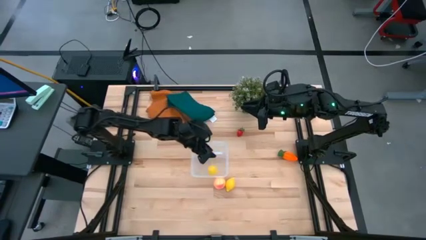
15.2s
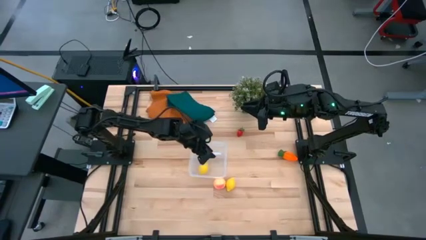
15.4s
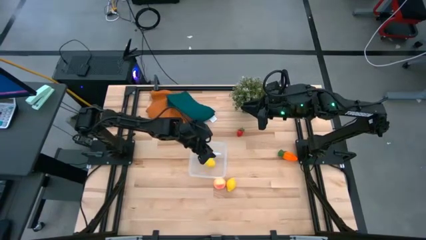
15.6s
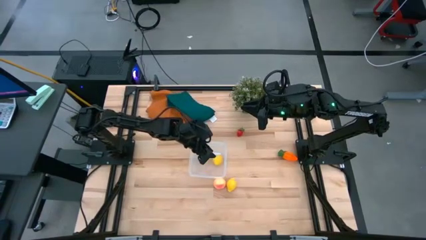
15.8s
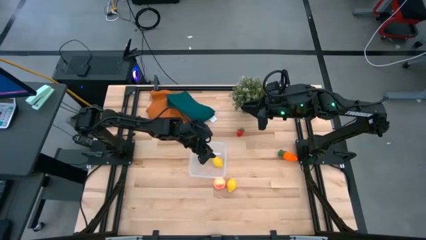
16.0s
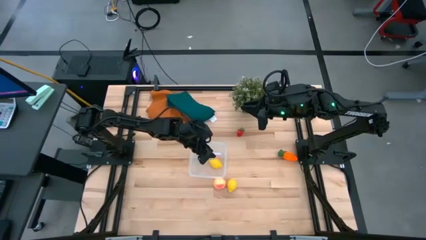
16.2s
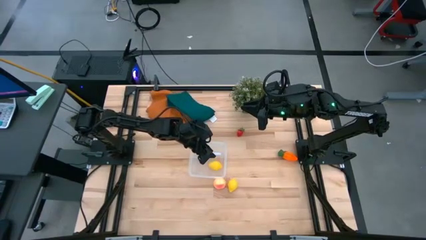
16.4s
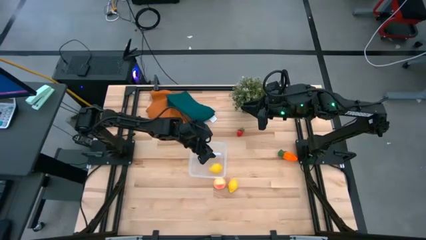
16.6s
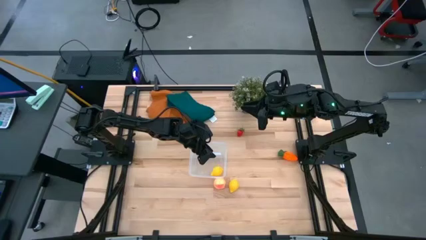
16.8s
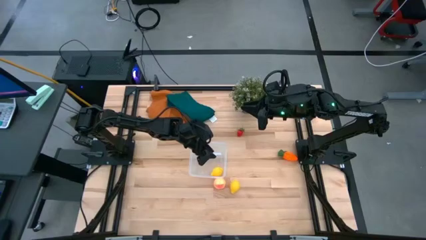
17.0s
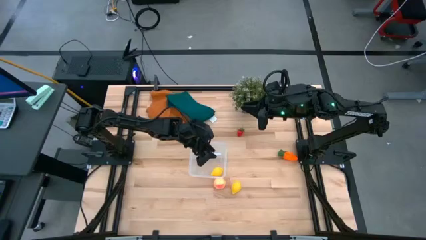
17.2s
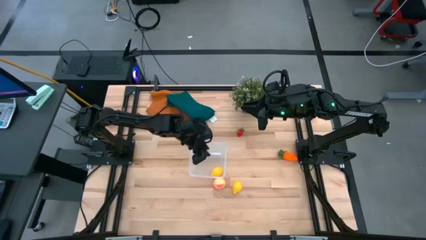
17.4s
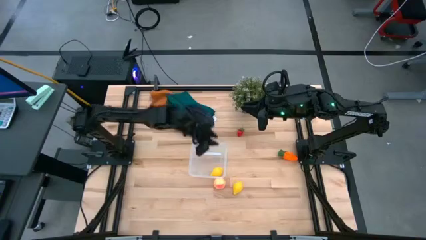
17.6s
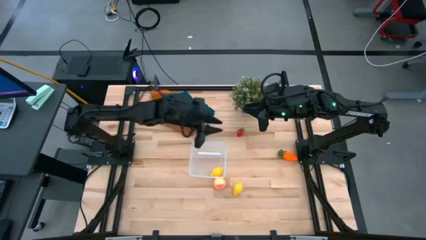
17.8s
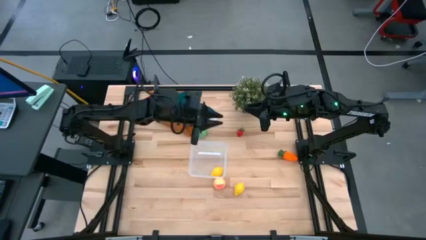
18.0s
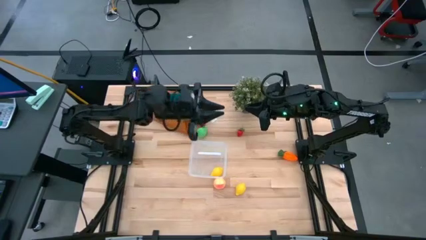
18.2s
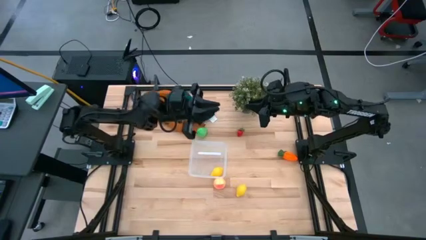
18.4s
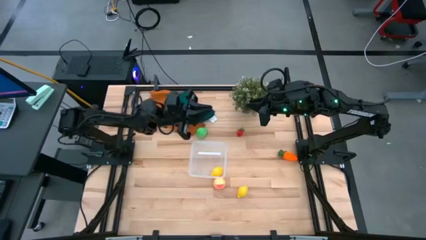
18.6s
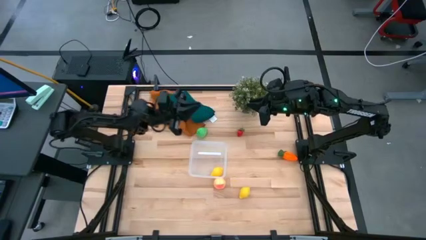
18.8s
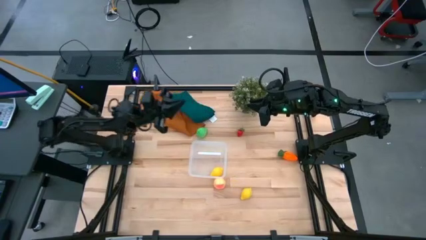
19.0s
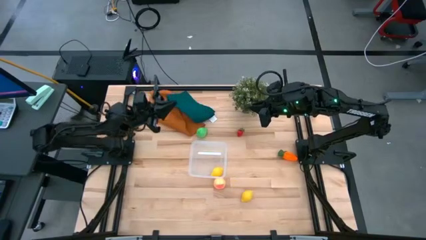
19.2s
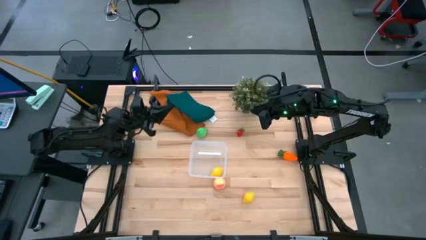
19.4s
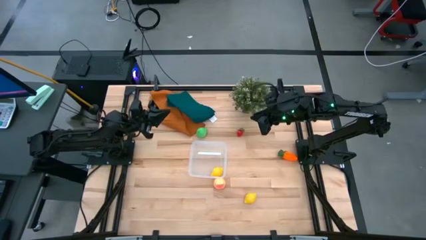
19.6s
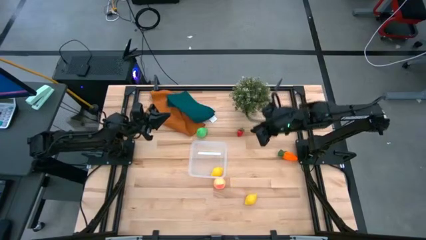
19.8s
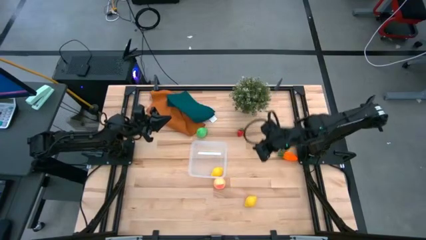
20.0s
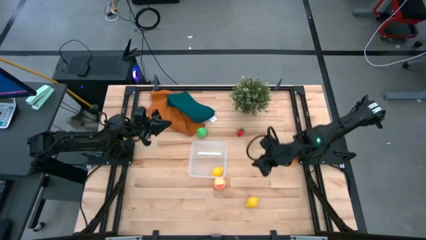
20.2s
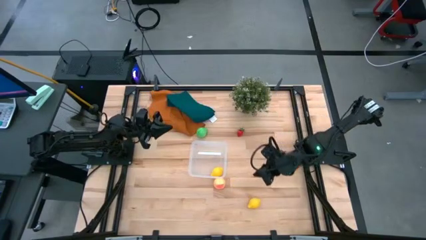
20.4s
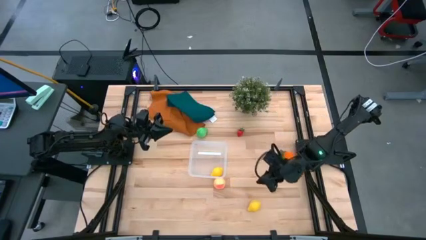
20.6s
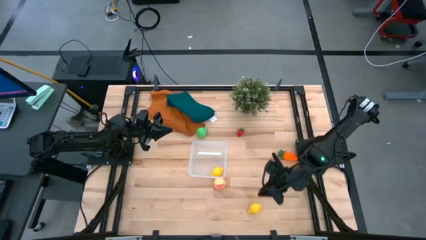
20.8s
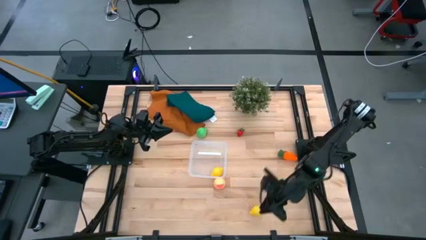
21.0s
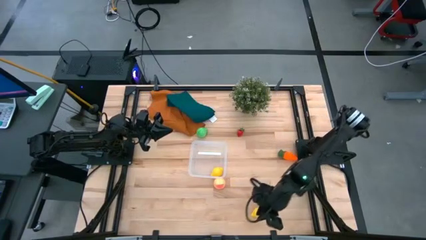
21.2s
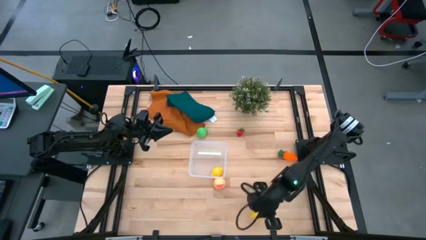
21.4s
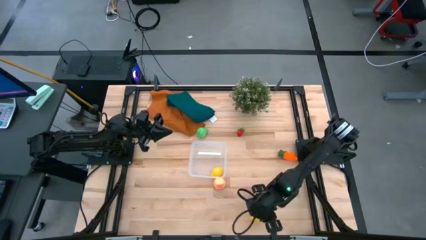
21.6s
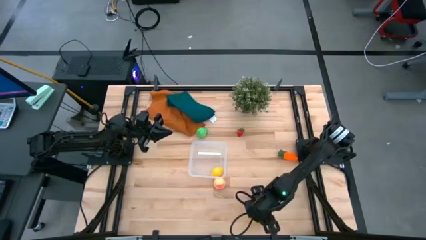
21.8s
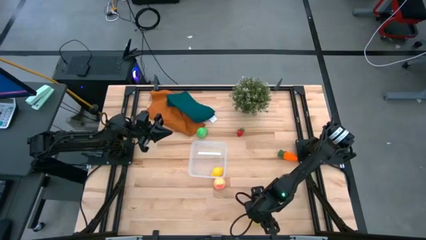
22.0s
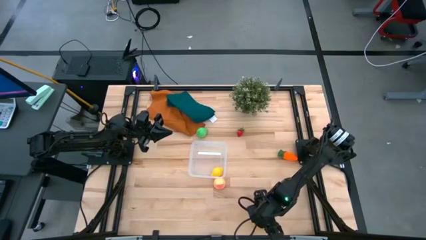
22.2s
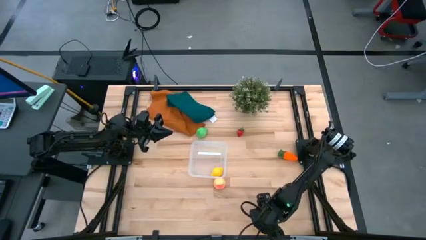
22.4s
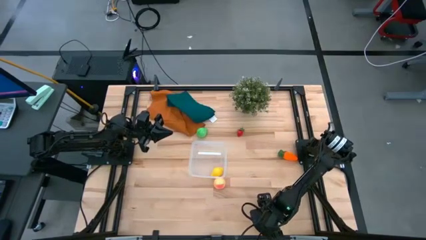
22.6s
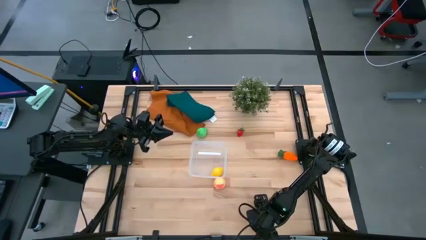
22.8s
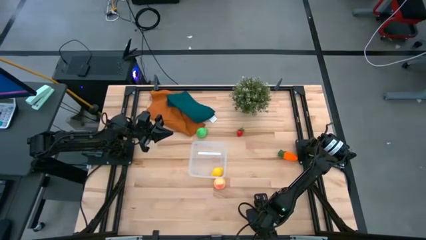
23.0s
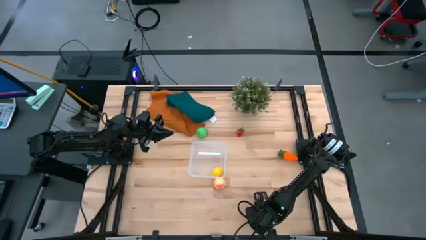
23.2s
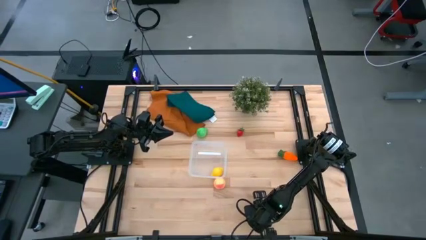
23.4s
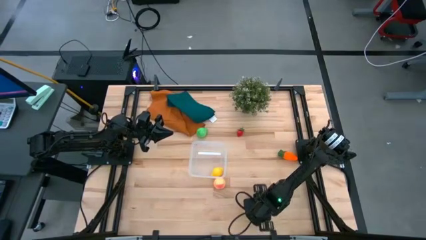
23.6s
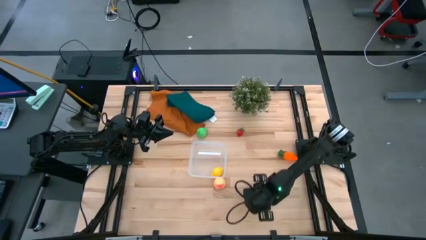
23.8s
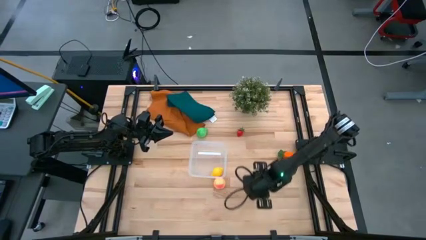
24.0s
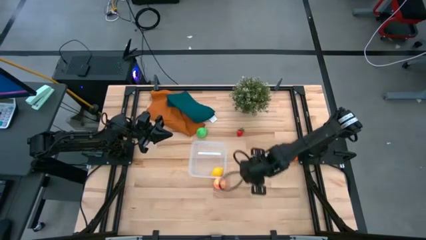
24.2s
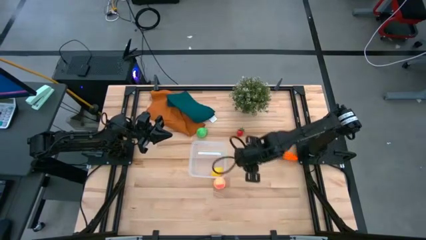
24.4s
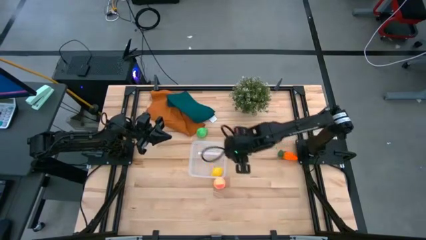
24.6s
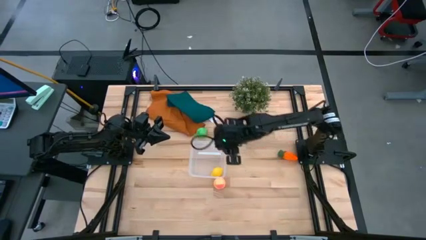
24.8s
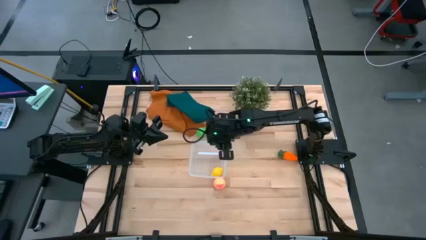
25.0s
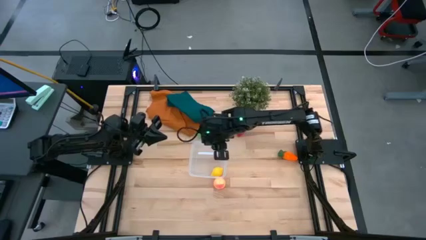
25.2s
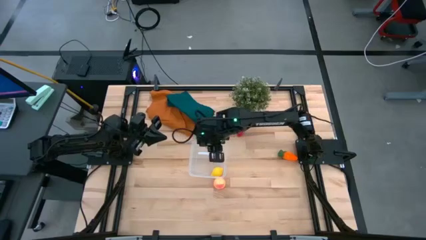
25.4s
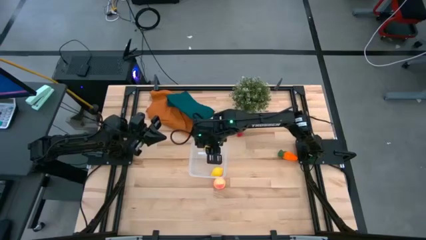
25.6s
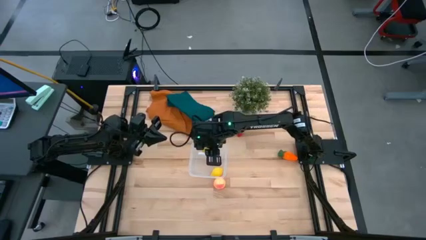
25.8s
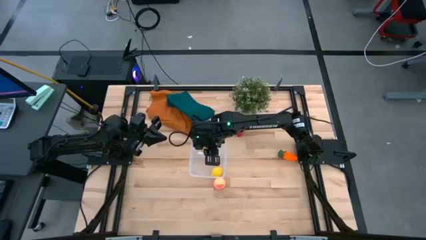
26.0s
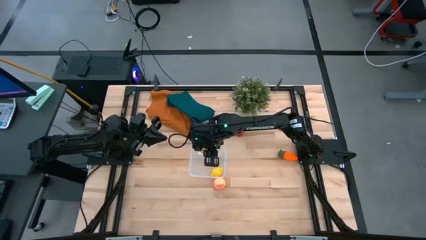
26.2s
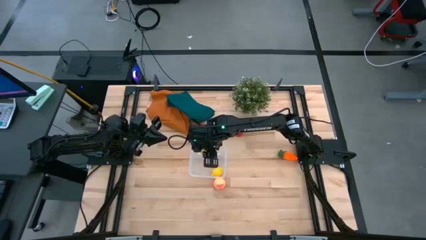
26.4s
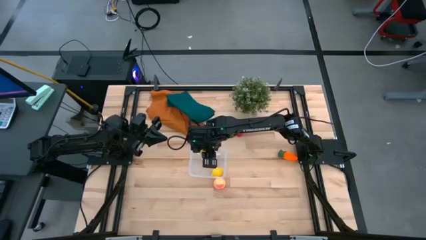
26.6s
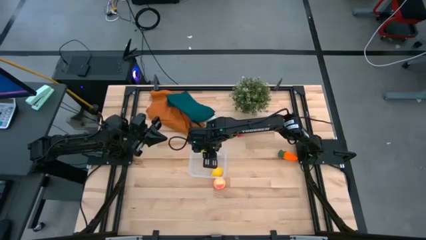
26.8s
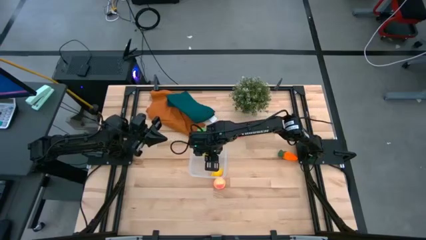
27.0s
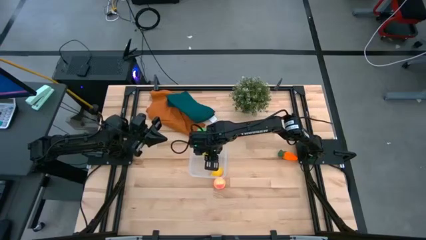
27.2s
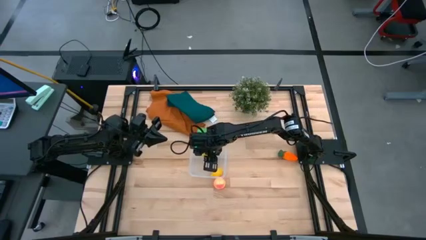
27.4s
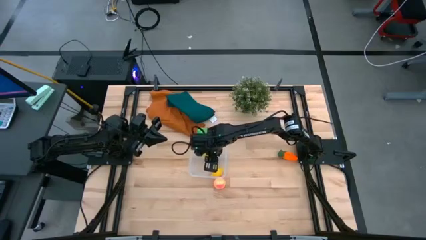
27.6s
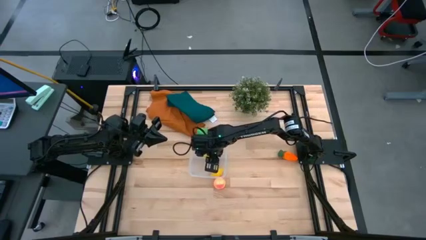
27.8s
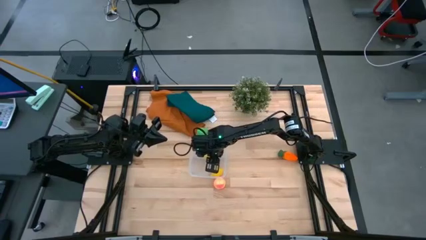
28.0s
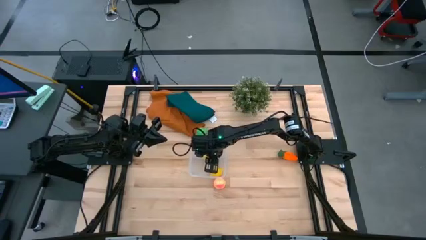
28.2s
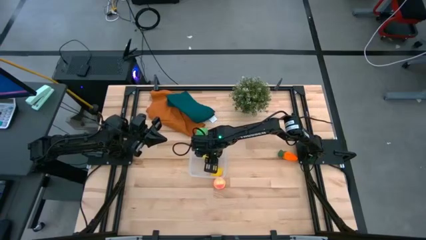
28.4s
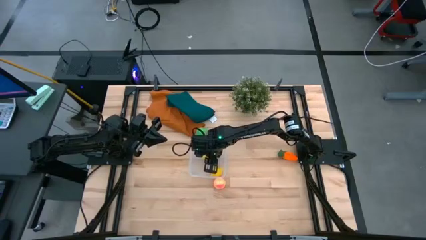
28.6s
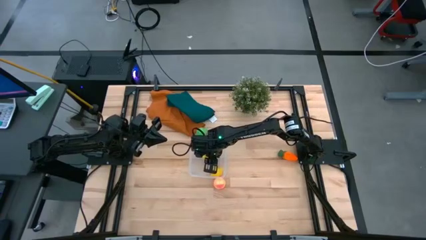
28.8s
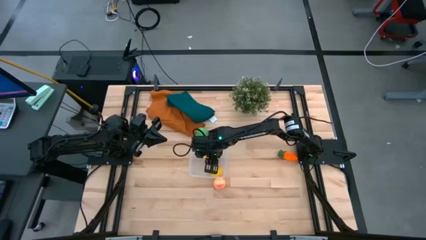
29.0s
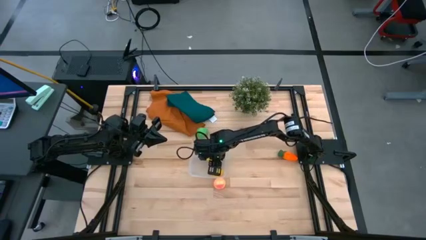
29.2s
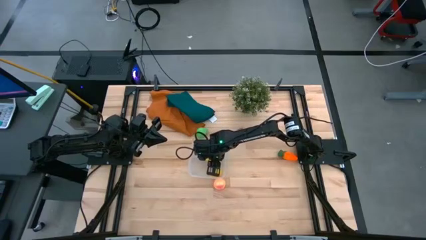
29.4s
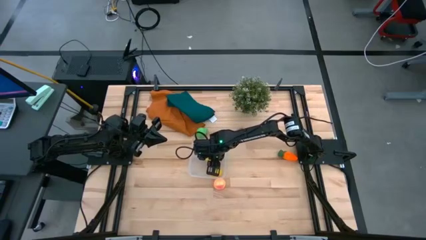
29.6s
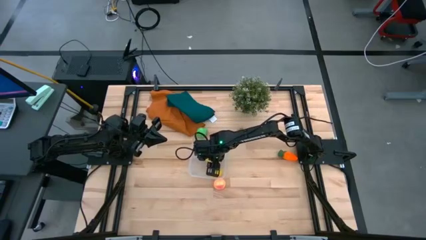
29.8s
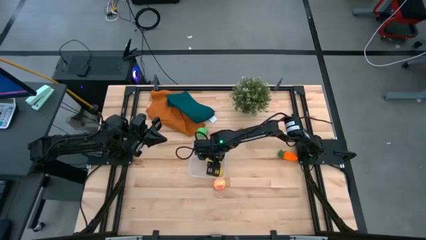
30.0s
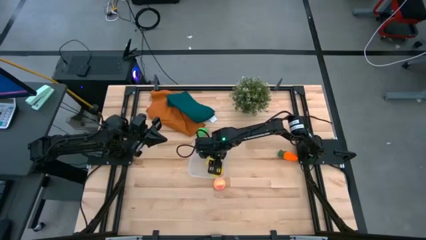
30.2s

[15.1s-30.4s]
Task: Pick and placing Produce into tupperware
Put the yellow lemon into the transparent container
